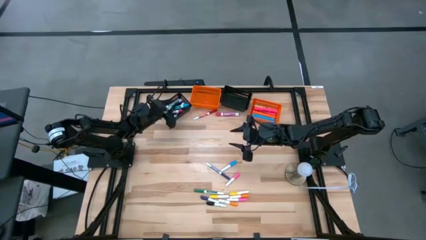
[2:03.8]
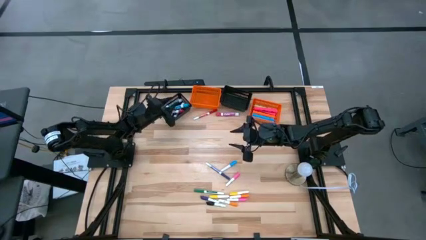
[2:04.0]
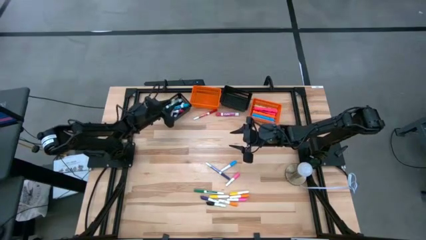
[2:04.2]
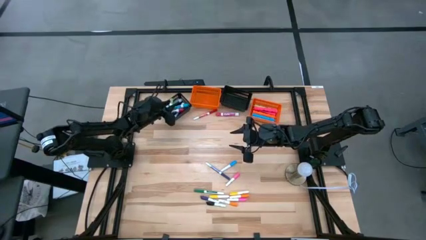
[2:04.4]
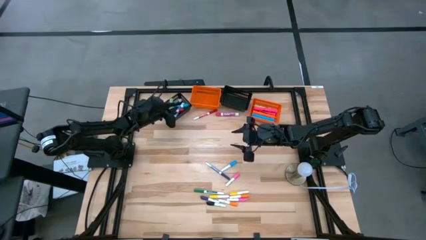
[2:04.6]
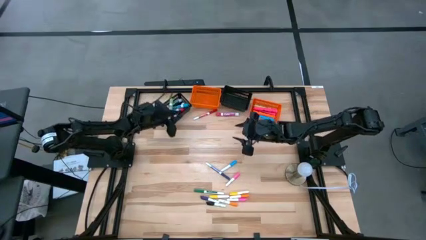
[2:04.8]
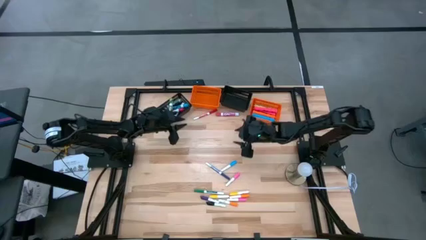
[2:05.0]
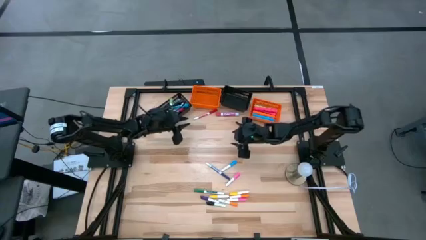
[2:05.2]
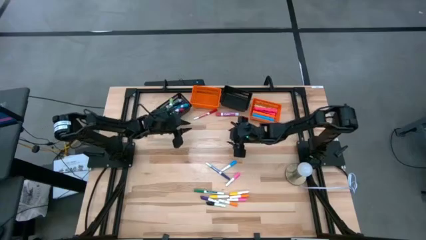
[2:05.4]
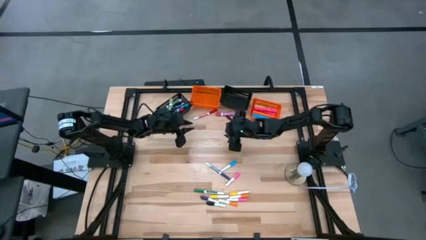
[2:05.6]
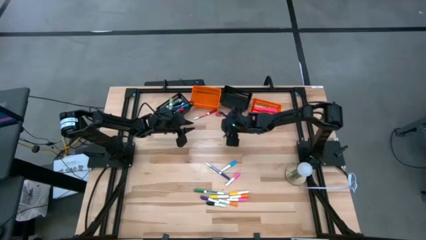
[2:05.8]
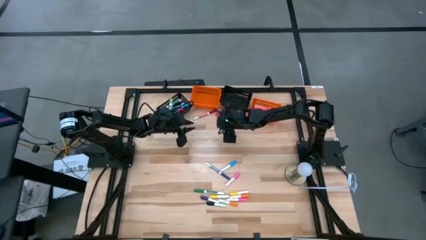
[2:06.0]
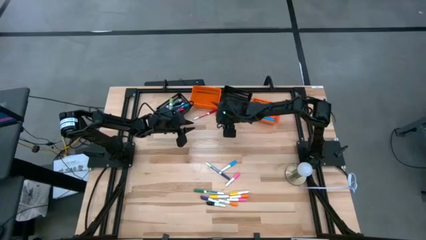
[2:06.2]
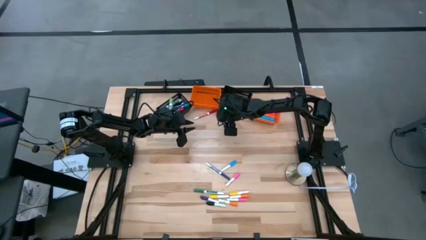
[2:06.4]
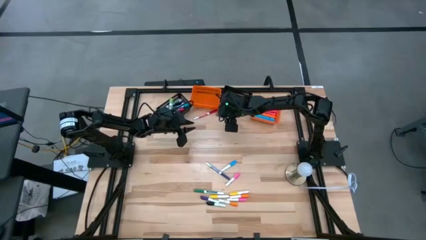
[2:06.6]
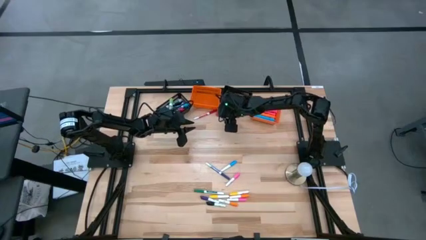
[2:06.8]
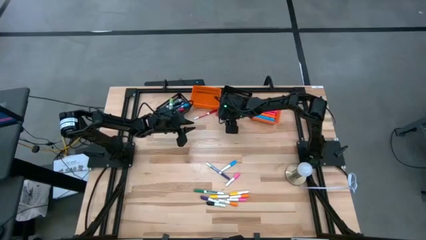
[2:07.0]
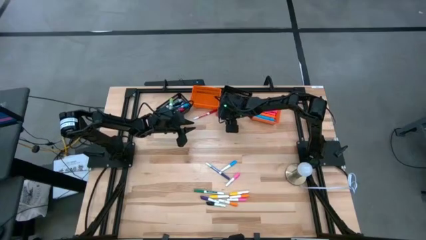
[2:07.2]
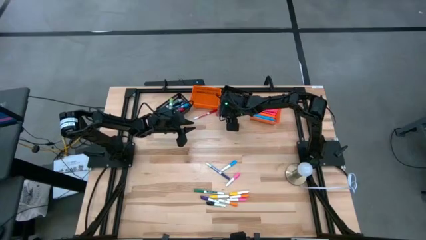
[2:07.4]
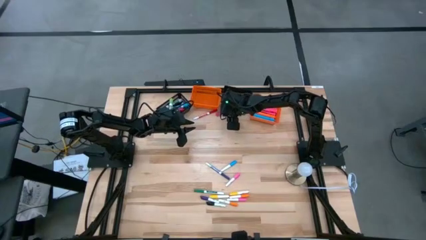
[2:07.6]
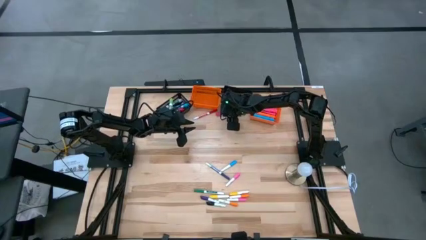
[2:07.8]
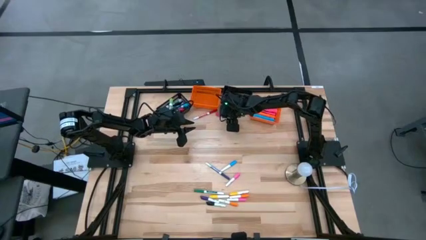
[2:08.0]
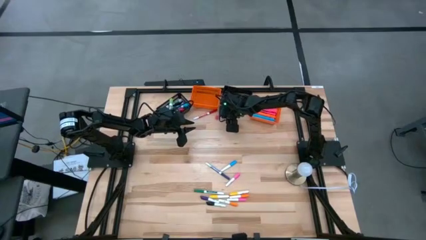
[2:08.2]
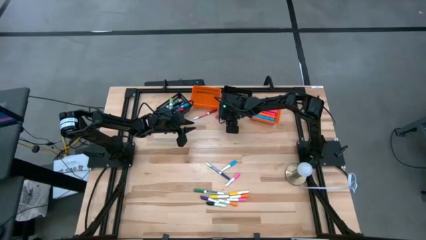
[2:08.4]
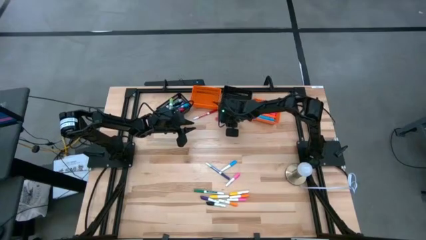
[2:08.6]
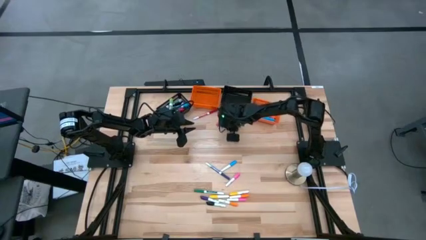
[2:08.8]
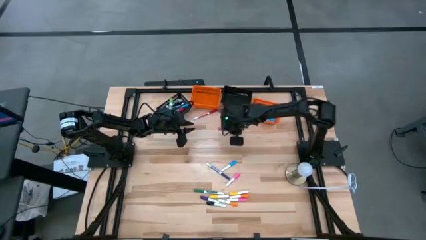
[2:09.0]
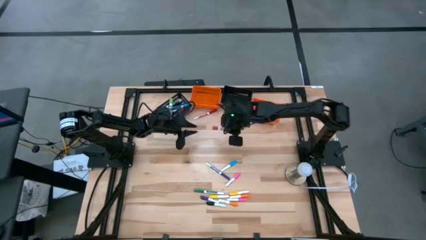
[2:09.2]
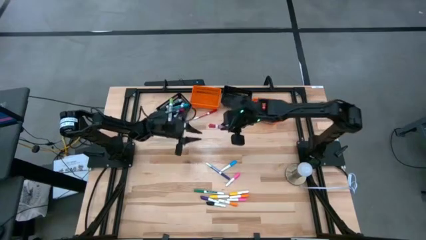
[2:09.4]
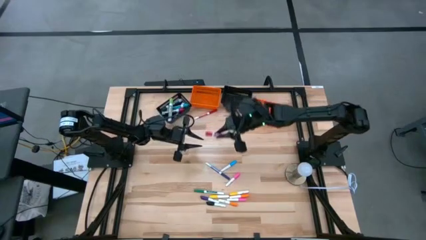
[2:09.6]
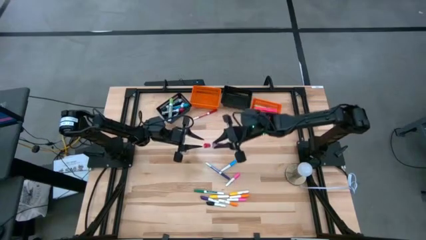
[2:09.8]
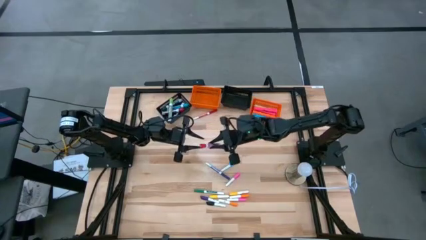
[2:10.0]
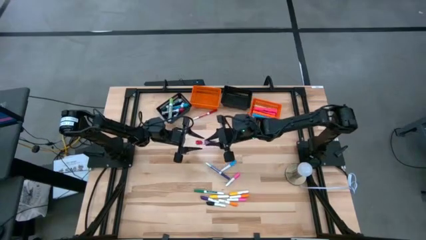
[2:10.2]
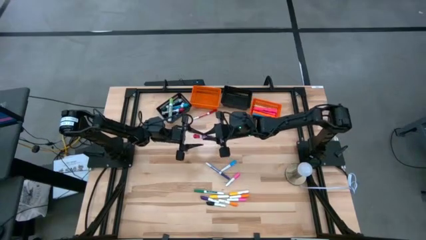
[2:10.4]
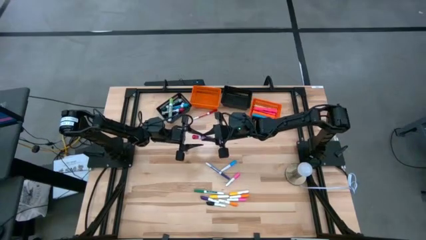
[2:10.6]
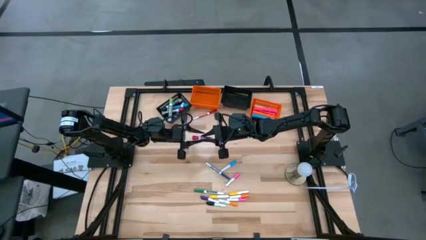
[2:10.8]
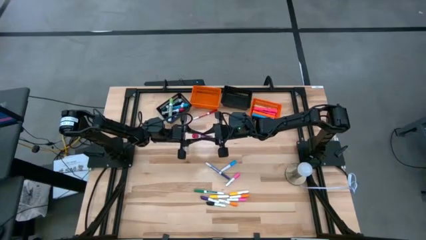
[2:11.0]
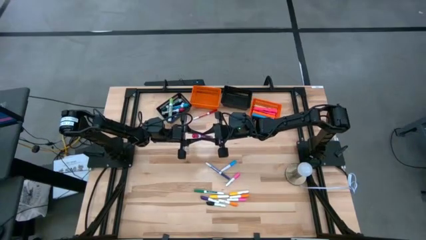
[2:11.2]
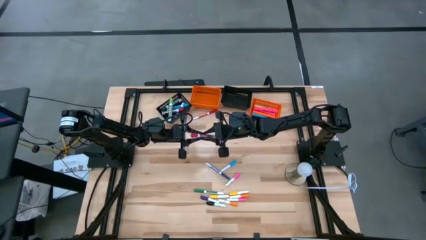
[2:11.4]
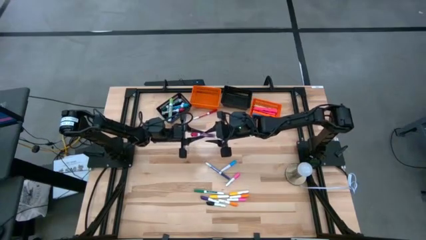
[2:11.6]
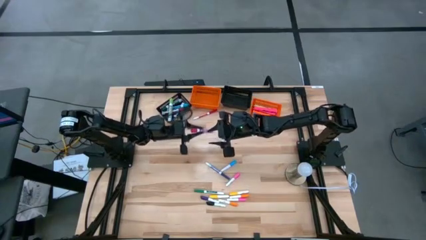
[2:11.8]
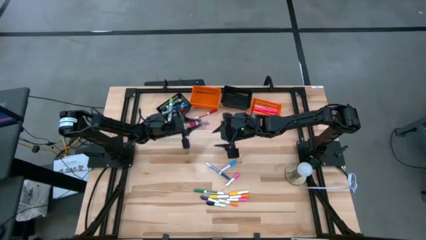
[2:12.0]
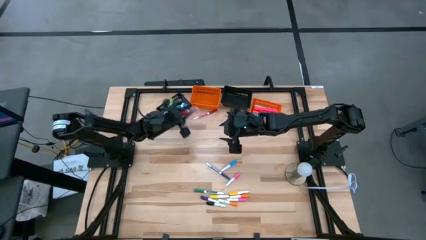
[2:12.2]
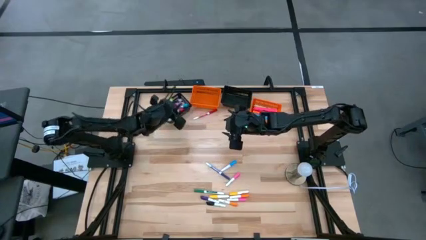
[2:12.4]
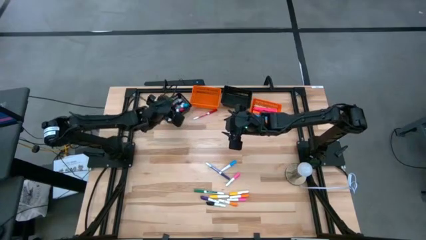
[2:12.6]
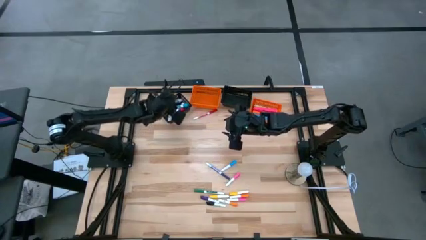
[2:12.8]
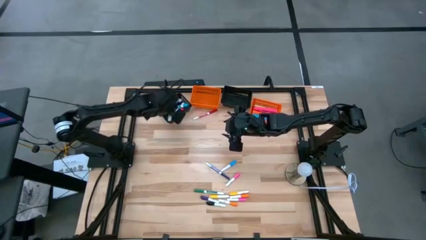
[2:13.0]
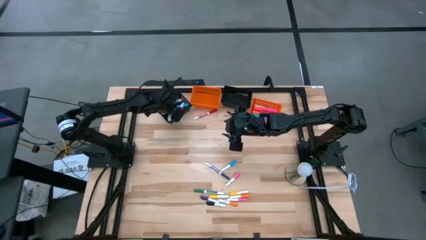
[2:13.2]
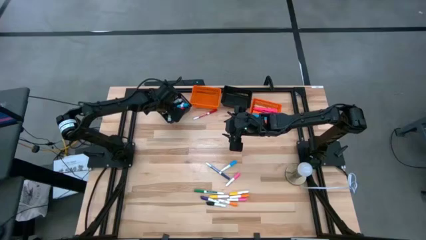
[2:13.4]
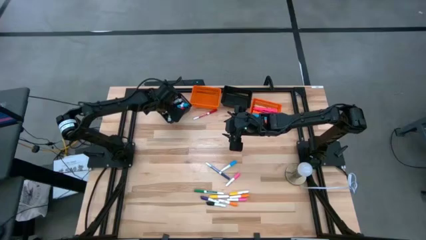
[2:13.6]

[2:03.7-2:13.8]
Task: Pick & Place Markers
Put the large pink marker into the left black bin

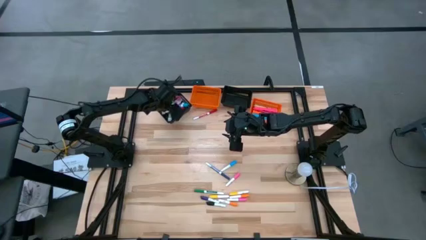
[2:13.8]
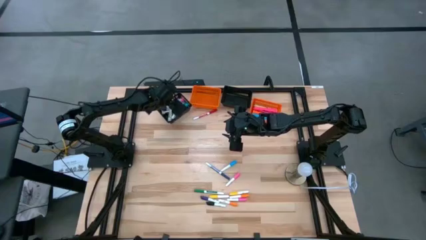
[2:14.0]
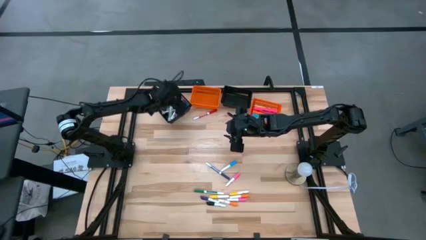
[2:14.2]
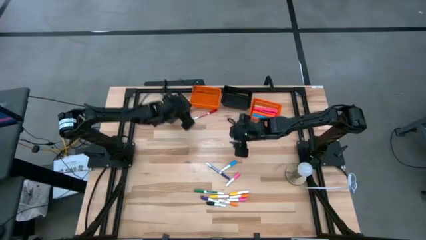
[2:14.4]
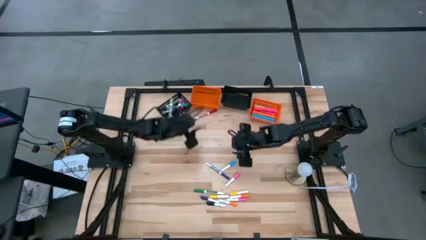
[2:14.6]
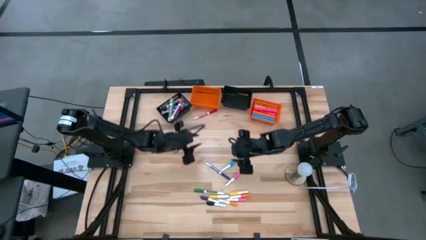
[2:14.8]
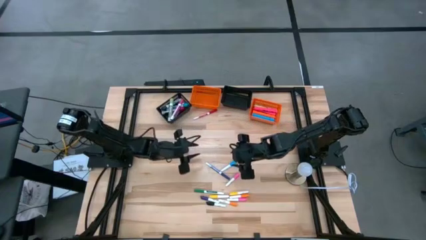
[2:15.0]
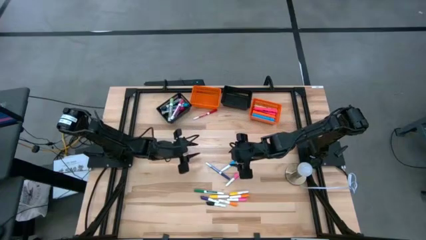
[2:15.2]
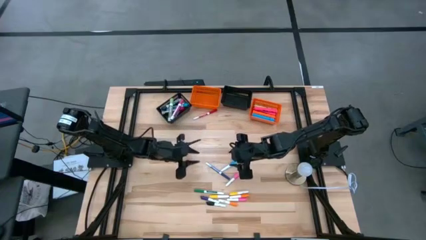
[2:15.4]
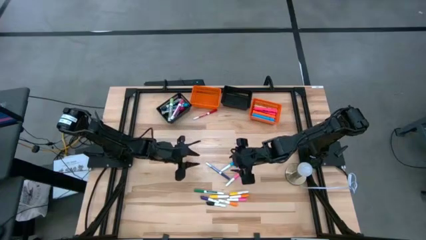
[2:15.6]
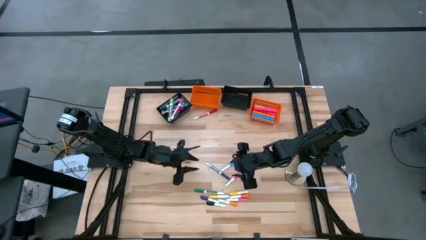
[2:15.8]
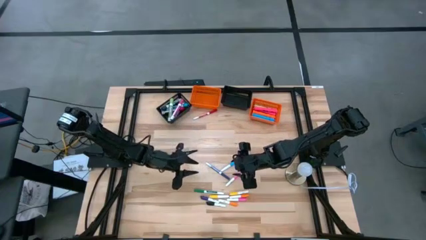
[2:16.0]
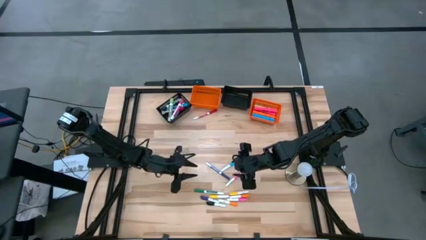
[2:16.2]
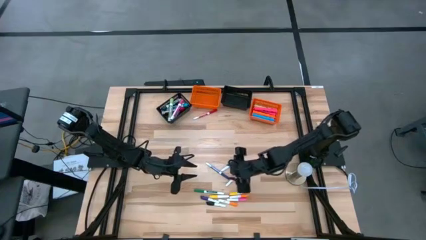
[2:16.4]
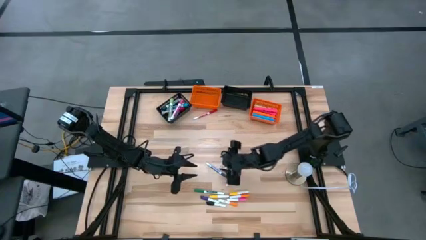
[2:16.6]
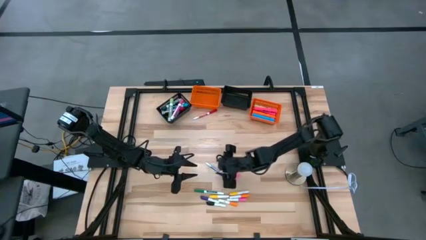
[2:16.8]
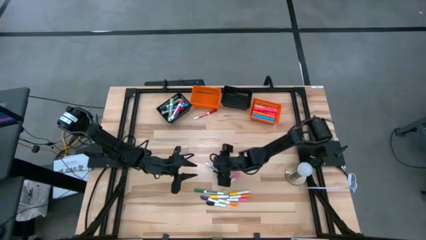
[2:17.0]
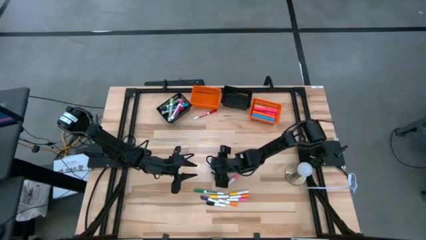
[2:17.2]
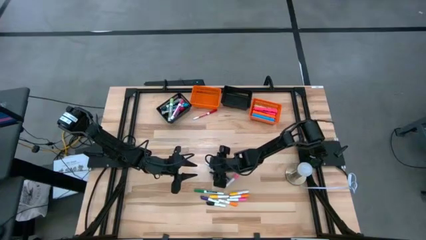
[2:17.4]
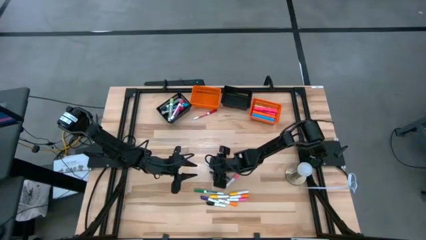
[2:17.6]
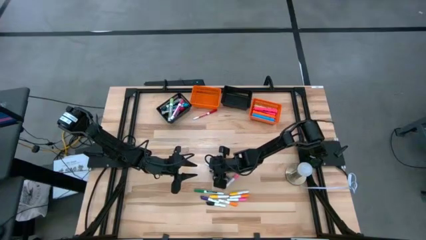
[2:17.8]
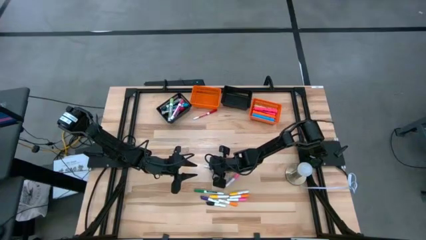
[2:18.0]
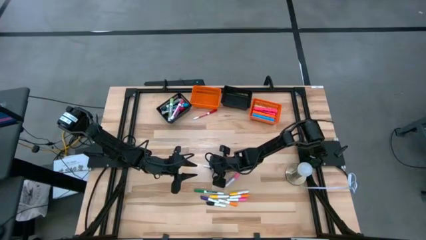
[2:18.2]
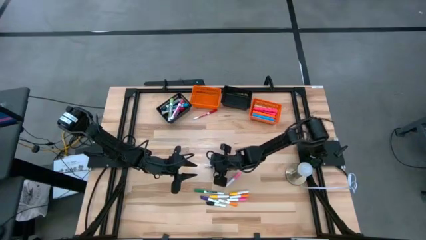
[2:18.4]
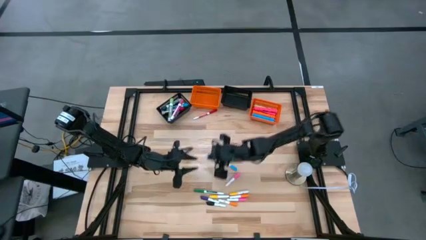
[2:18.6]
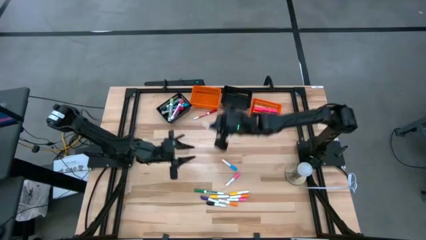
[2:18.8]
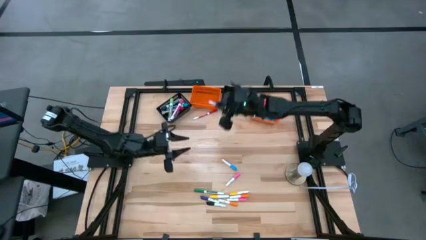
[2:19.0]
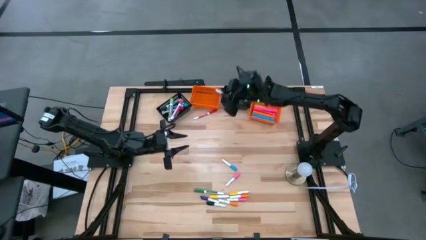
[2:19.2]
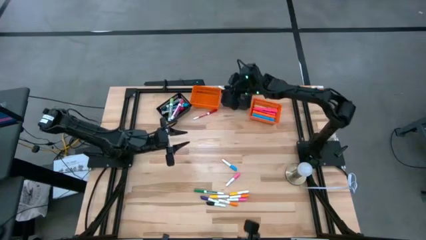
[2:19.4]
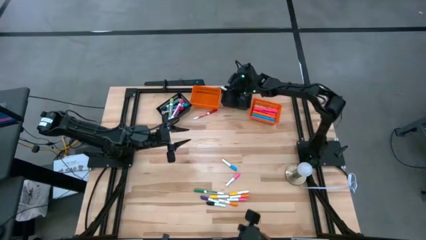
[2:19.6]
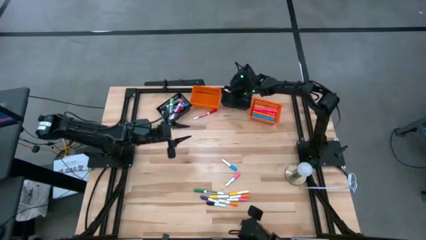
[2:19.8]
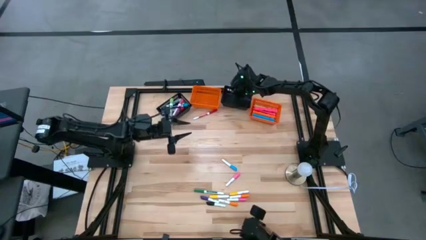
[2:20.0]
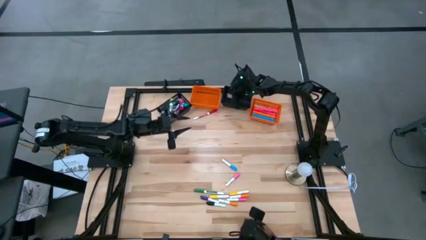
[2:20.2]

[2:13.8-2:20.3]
Put the small blue marker into the right black bin
